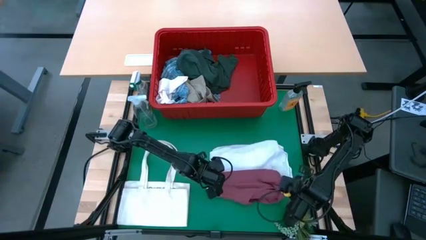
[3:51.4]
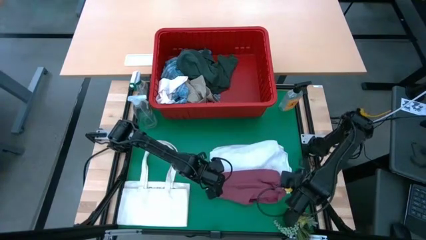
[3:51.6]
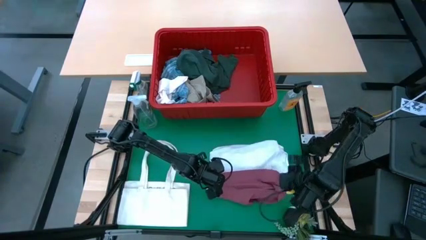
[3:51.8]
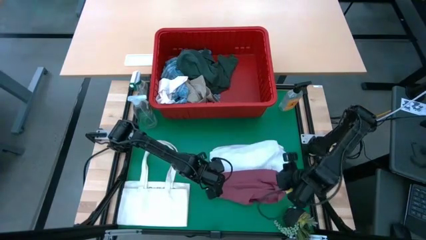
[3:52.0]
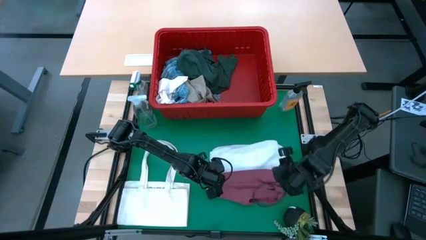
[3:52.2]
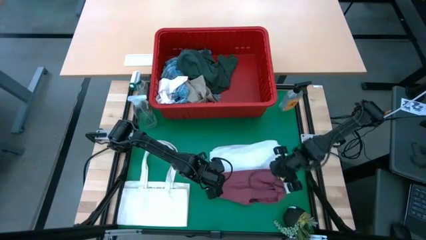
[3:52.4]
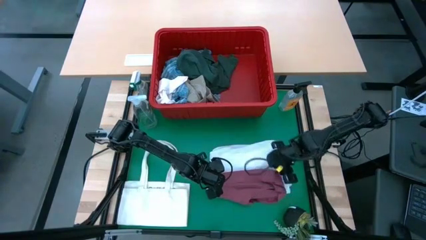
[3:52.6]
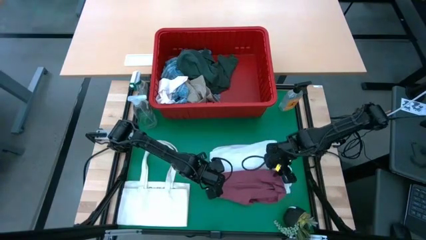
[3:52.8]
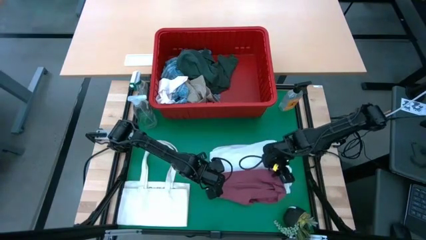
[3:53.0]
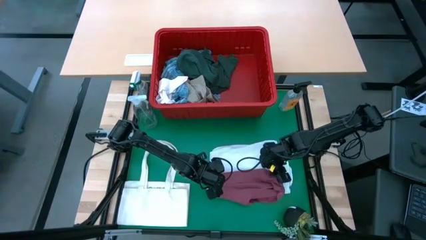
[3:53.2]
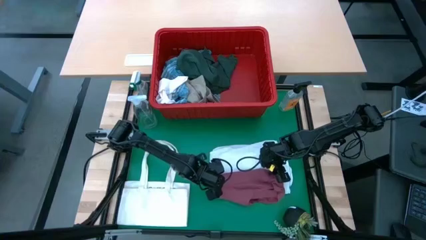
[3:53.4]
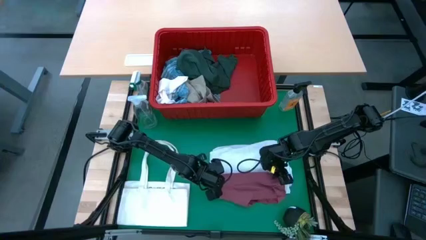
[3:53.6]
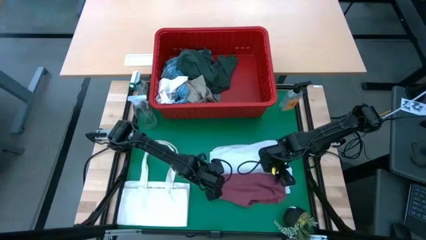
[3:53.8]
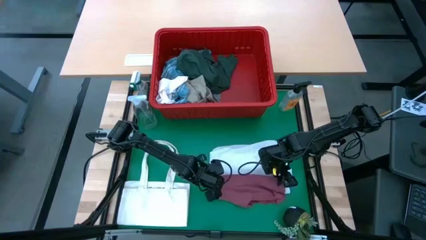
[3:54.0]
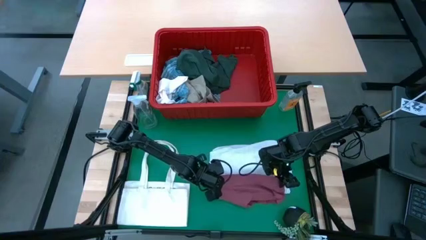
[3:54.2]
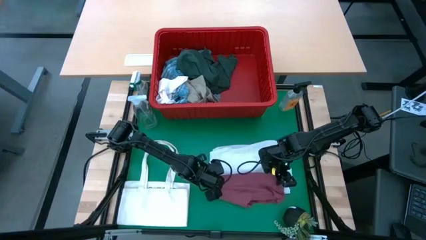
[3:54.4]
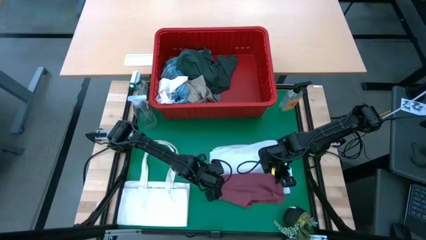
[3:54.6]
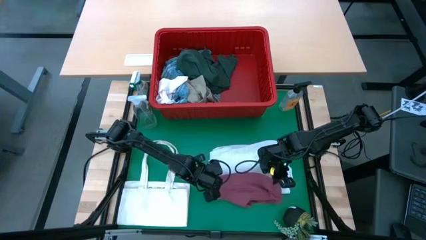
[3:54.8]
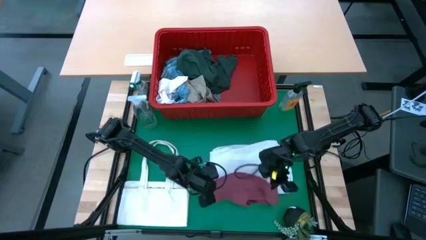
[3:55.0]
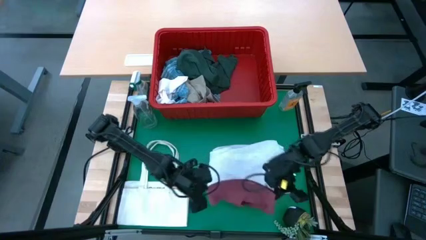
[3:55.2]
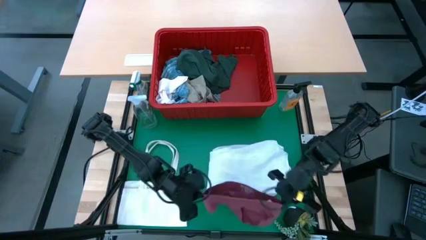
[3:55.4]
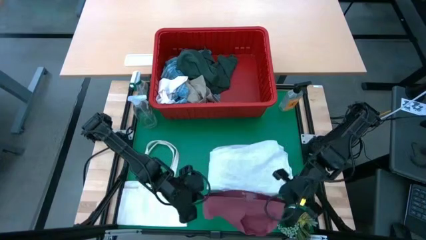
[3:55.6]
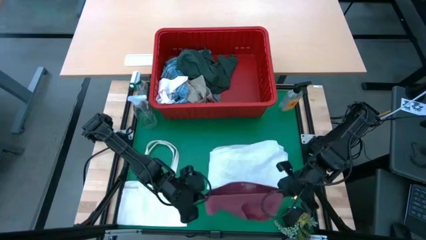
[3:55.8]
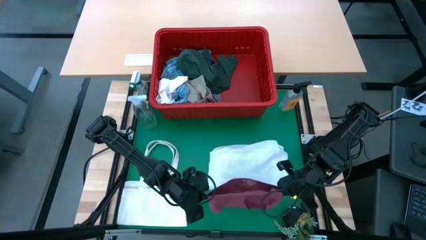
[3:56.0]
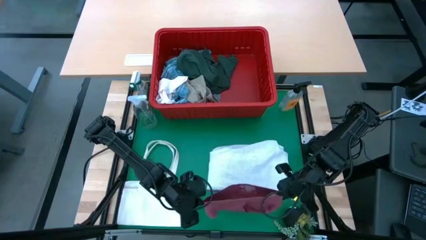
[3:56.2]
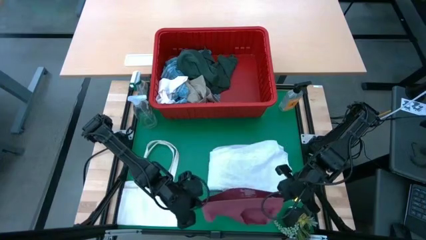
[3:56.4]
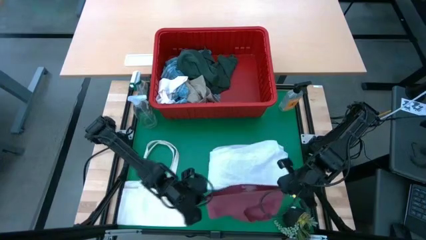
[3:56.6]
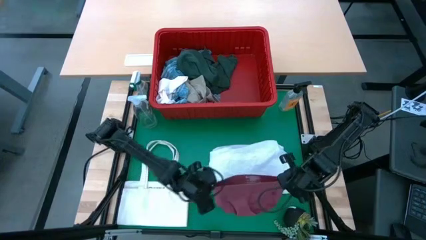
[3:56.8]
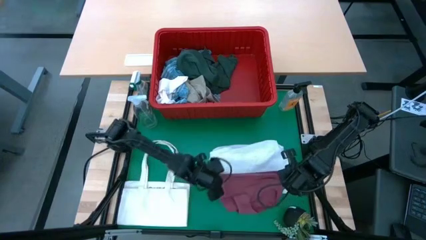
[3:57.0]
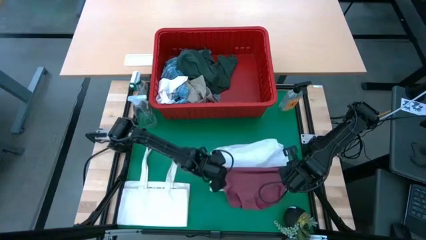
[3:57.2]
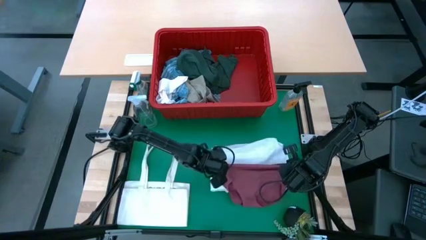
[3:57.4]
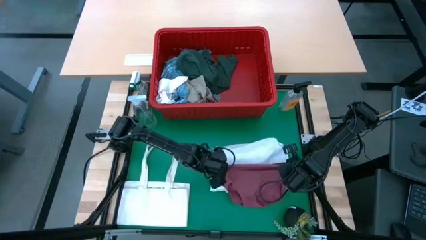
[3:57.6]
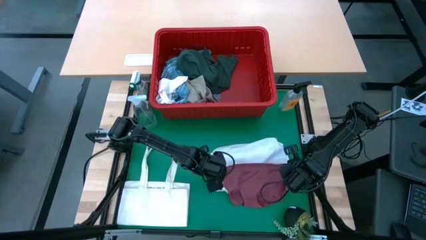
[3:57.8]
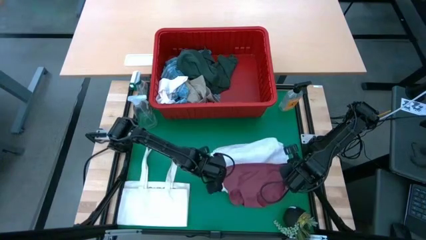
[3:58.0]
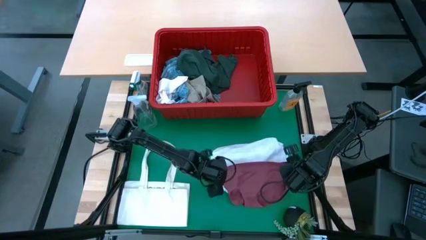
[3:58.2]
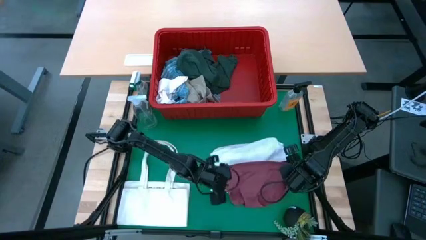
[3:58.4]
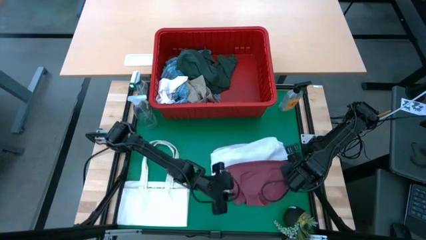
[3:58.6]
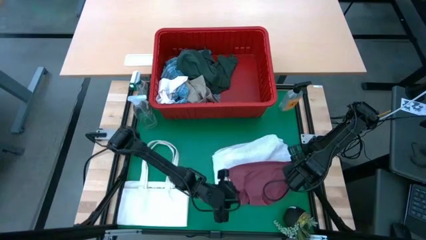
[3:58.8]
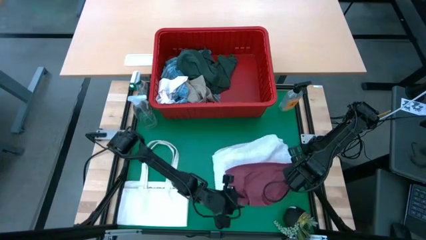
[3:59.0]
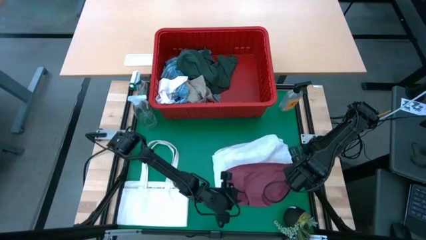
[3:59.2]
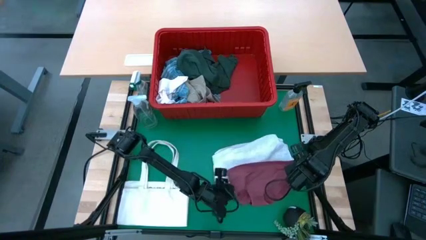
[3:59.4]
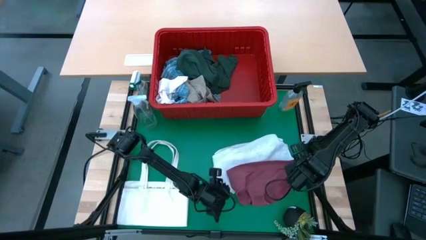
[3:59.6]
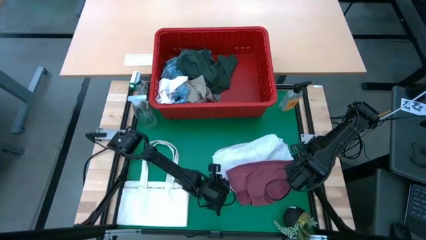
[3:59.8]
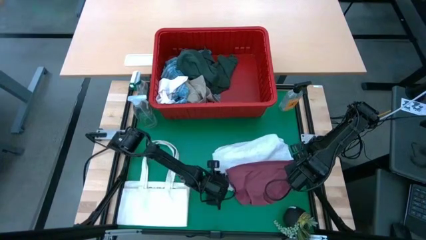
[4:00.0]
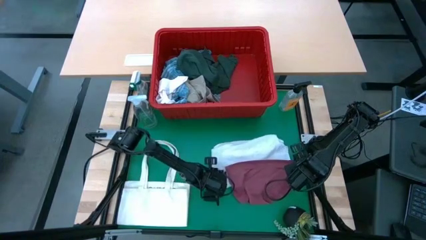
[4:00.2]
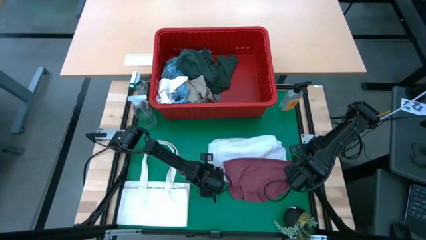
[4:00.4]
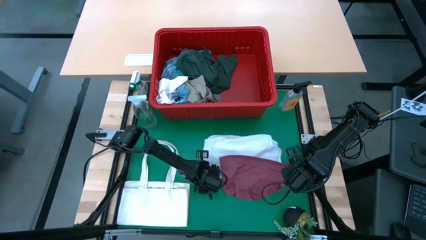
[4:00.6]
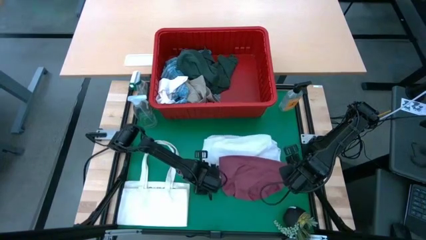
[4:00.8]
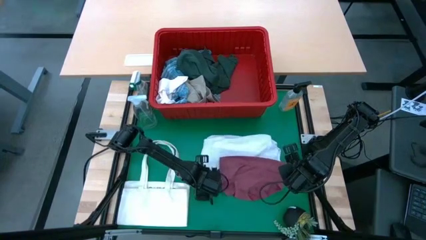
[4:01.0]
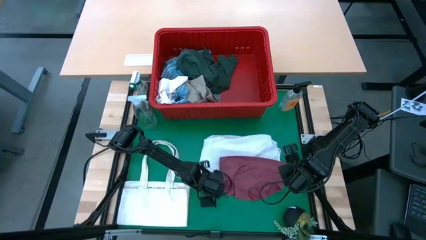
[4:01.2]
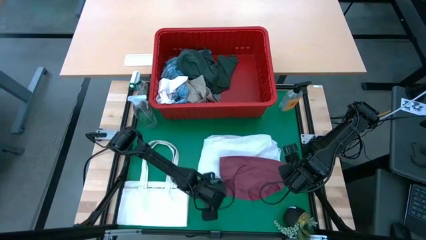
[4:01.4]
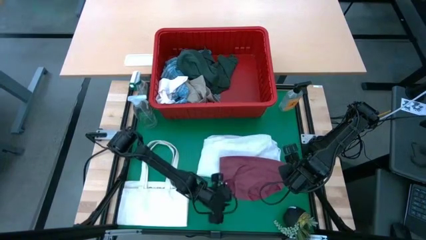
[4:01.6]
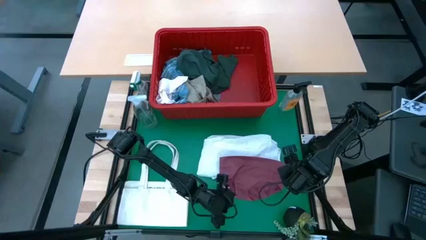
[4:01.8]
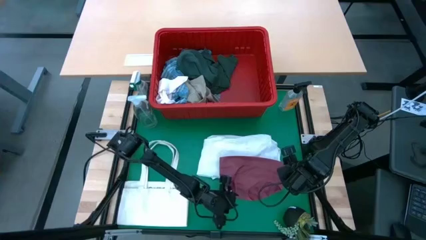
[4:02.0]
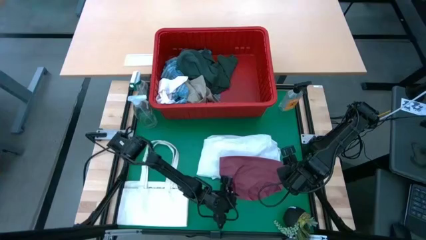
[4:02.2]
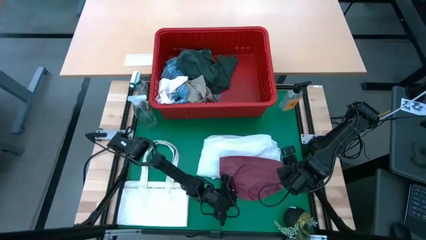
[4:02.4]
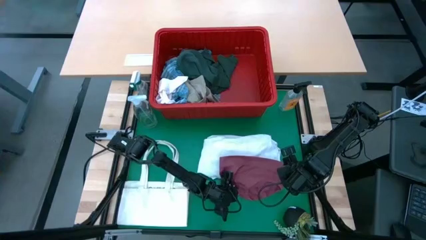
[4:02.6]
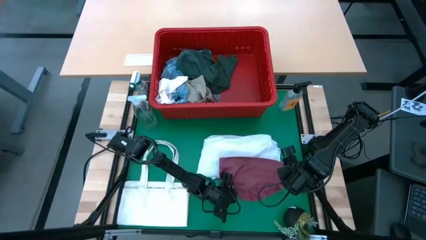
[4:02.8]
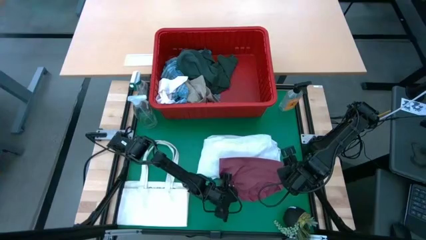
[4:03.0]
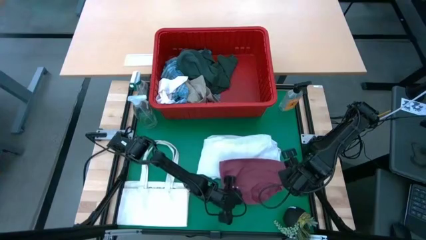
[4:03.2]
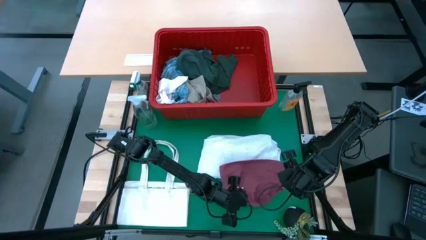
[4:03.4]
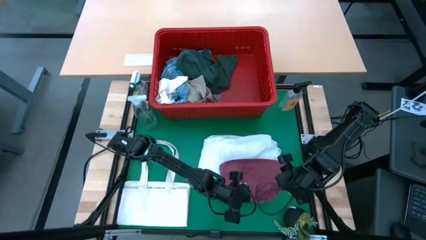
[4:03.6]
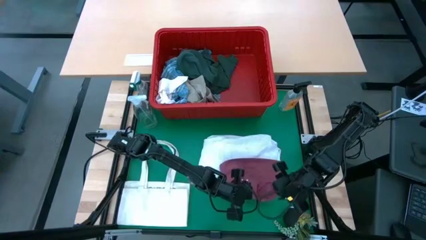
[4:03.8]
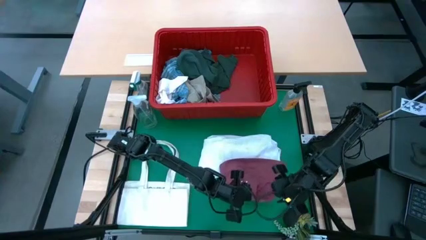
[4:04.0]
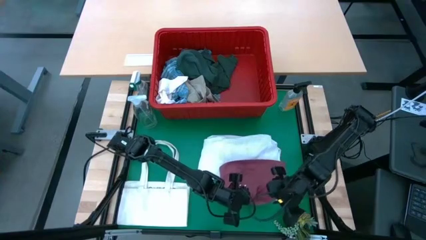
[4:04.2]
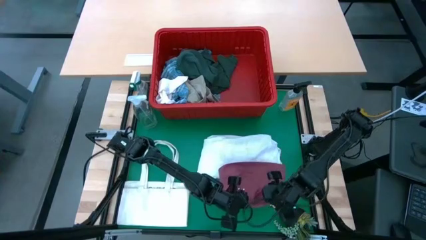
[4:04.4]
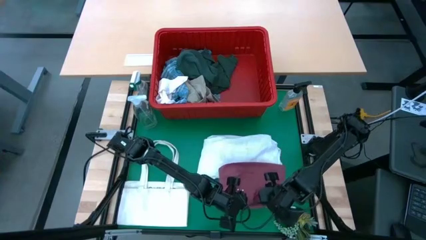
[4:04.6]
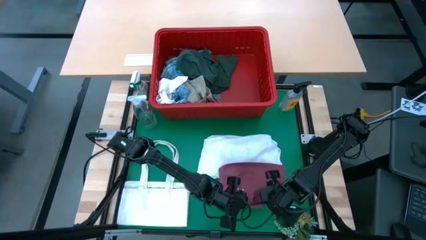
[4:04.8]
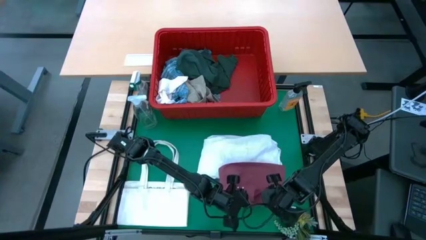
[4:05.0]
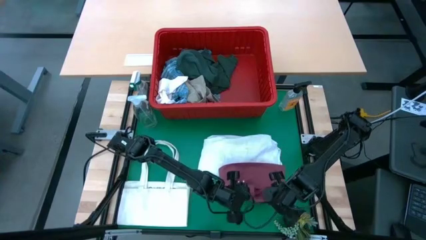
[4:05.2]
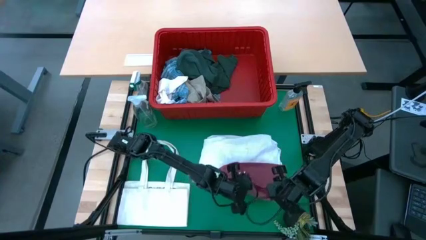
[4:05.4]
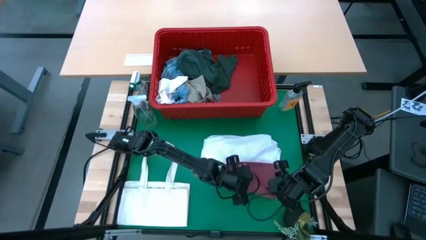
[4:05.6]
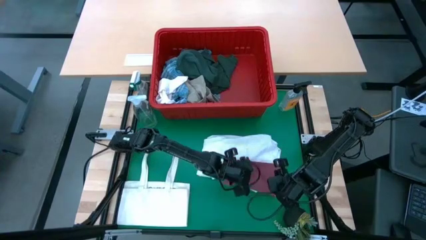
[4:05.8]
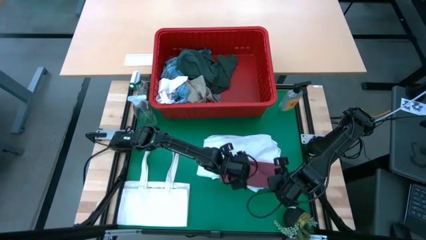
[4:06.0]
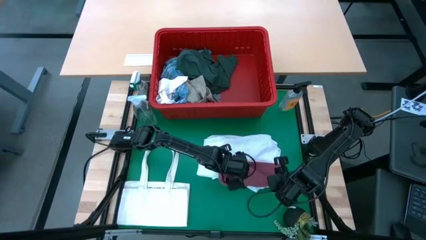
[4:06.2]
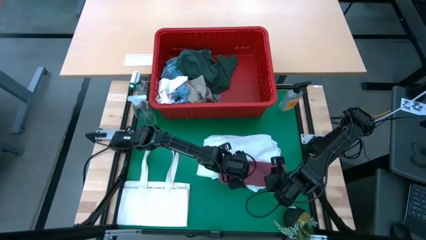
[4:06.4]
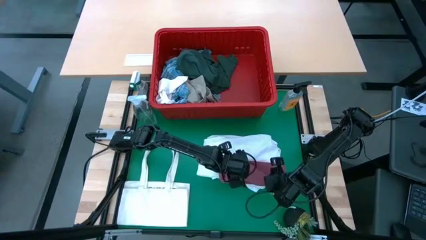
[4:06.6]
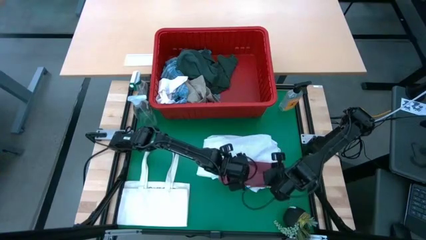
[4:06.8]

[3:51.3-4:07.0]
Task: Fold Laundry from Bin
Fold the pink underwear
